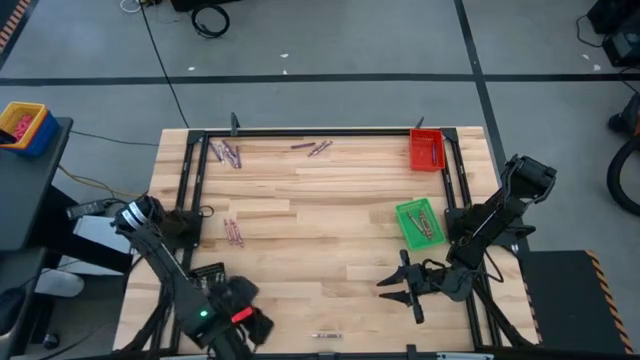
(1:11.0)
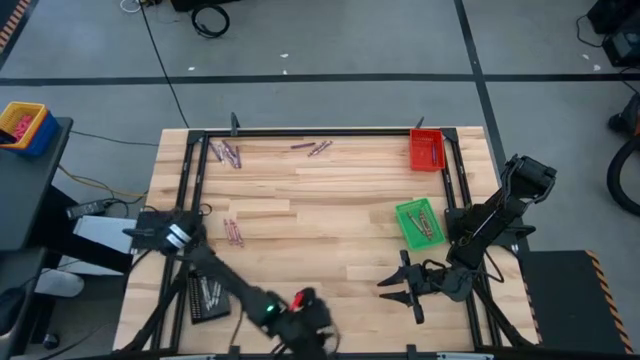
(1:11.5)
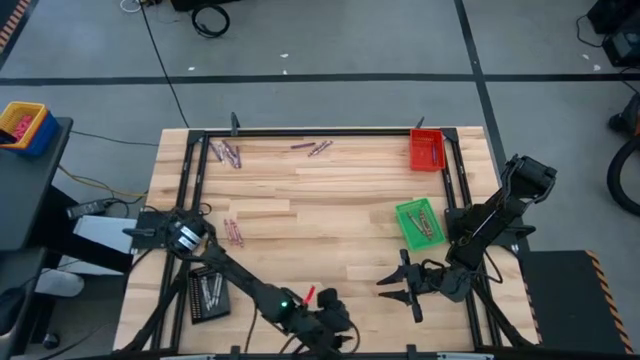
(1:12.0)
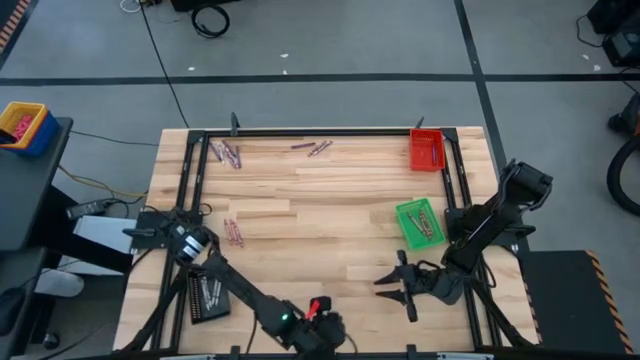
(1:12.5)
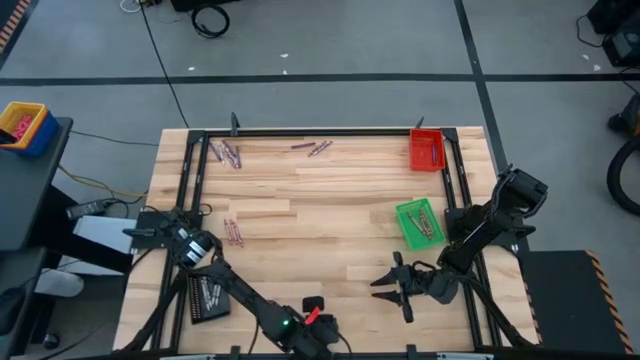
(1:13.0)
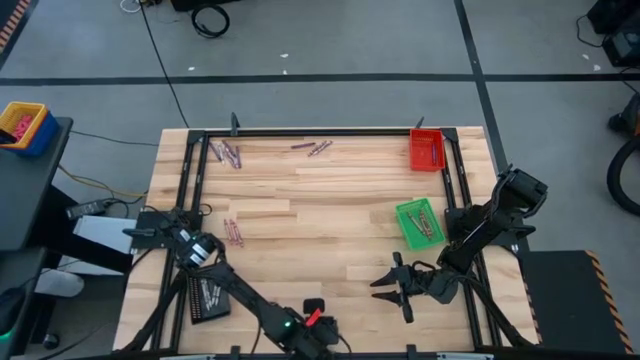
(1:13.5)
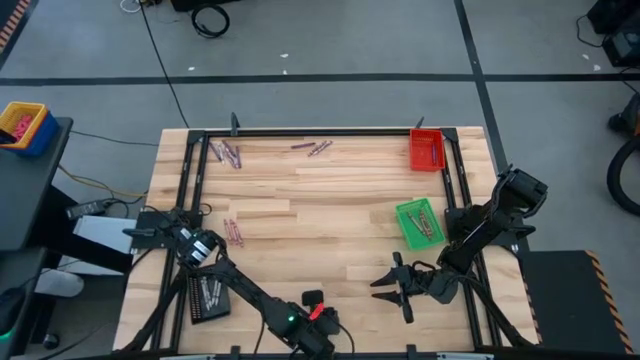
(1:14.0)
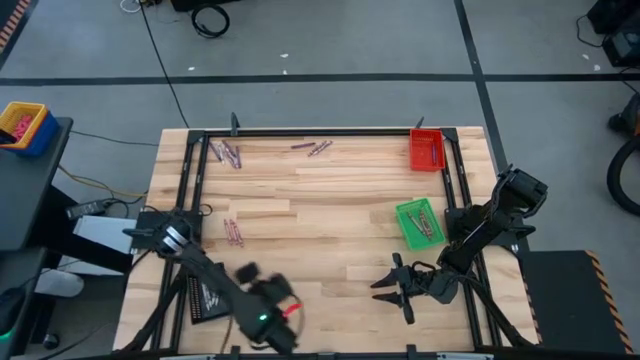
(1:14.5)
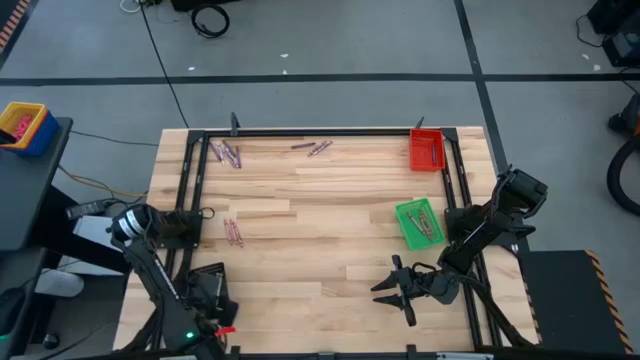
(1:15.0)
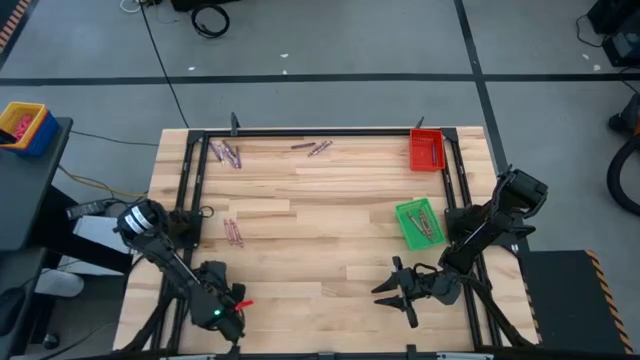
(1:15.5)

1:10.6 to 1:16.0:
Task: Sort crayons
Put the white crayon into the black bin

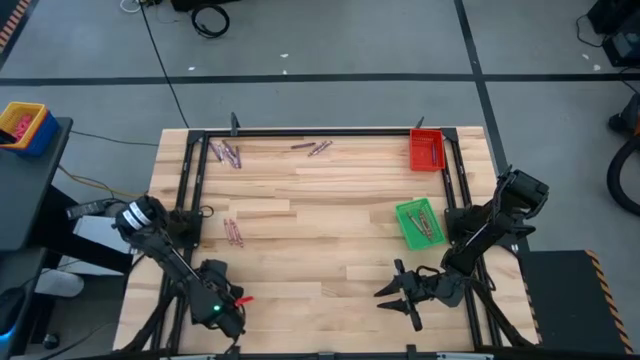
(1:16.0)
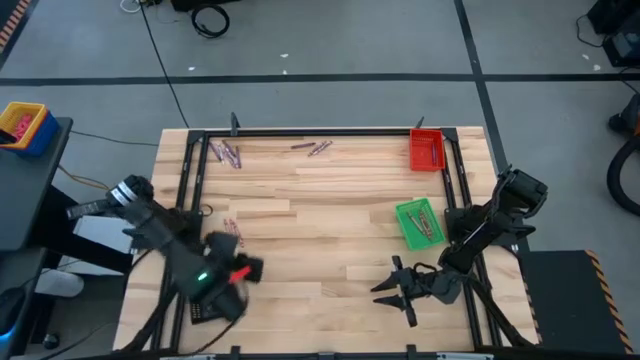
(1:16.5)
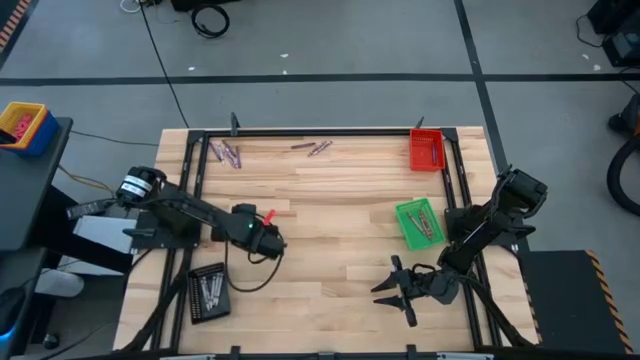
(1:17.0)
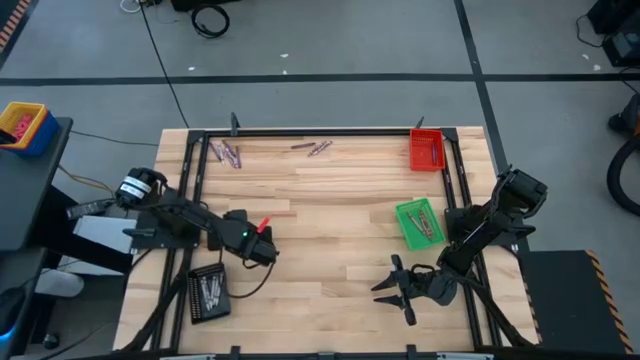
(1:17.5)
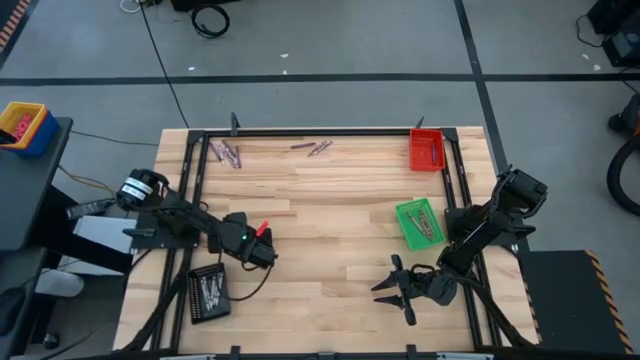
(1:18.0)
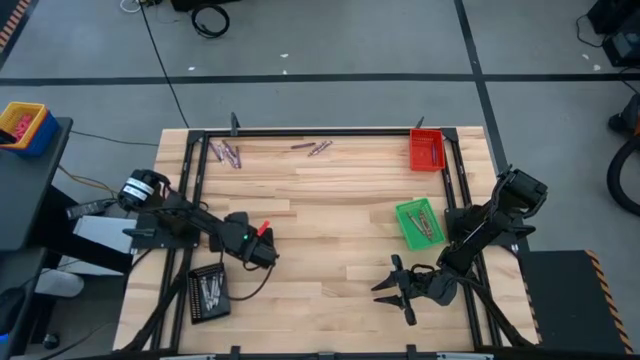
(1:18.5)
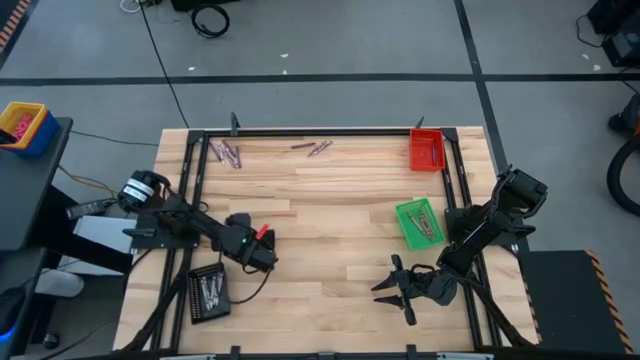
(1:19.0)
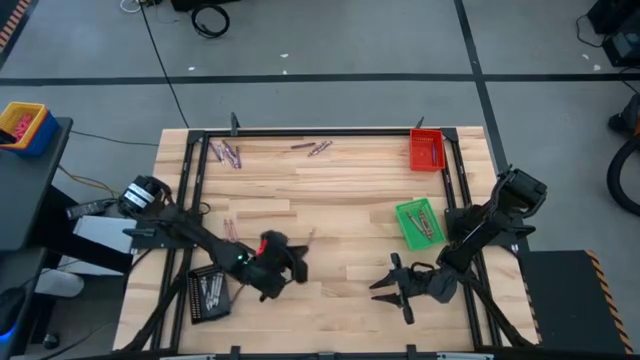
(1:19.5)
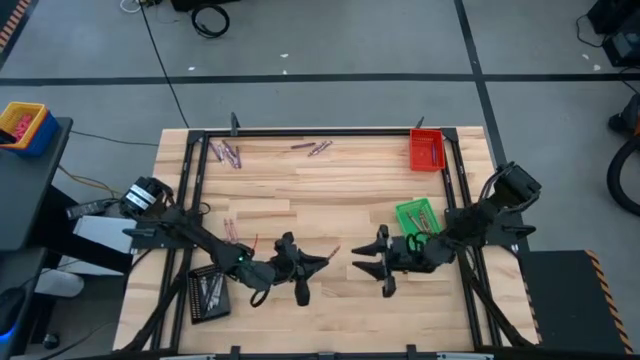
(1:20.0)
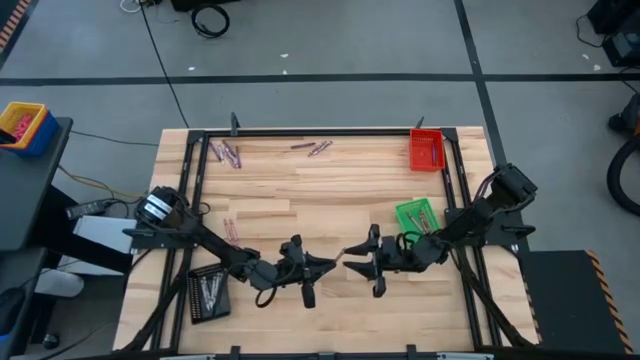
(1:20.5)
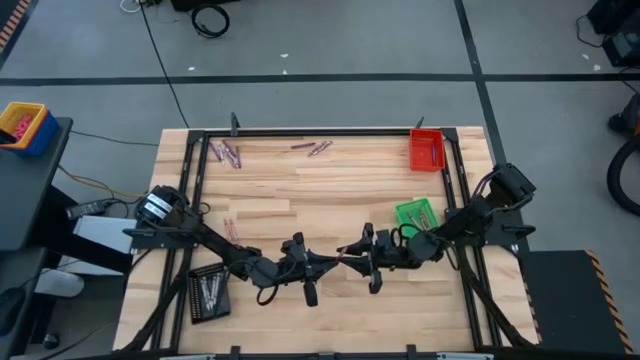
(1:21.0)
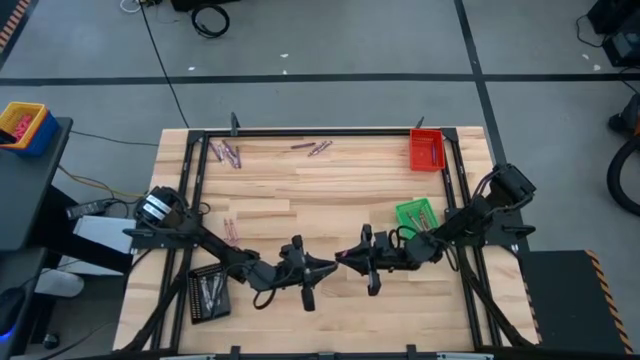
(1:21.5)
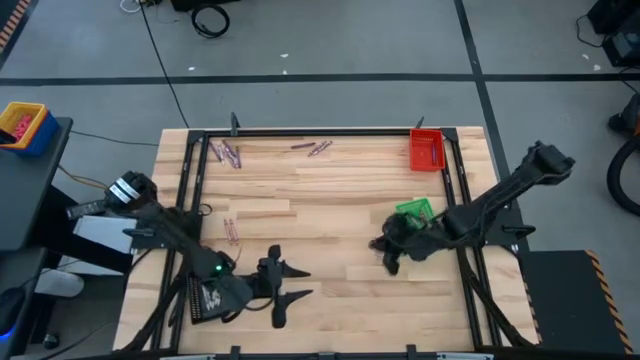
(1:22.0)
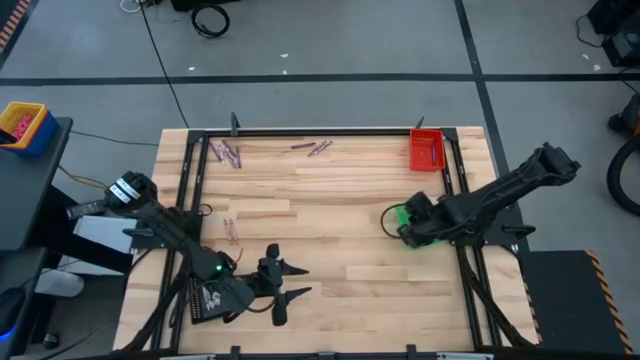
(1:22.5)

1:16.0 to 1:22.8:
Put the pink crayon into the green bin

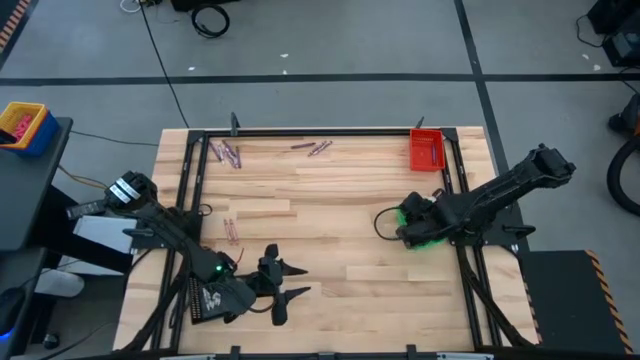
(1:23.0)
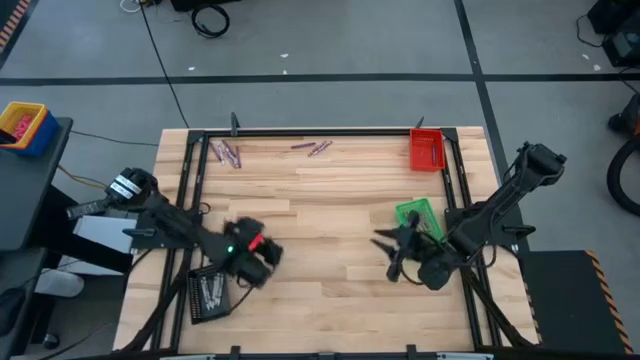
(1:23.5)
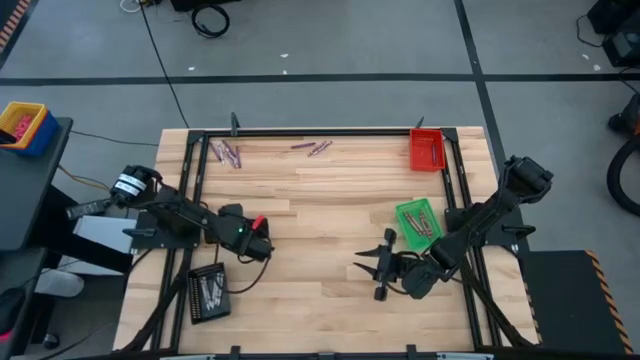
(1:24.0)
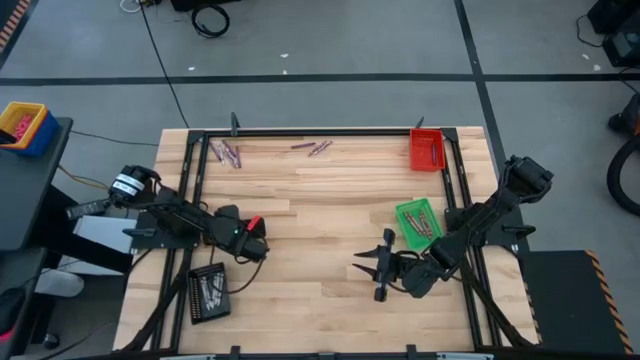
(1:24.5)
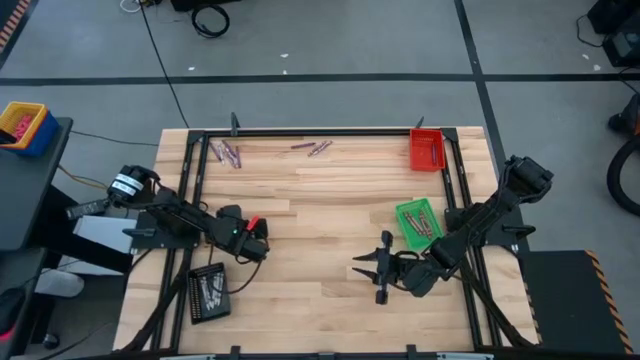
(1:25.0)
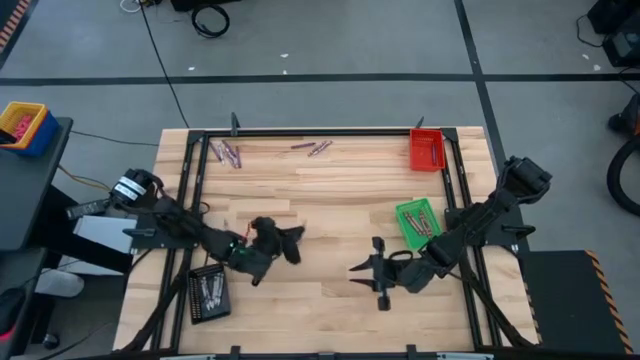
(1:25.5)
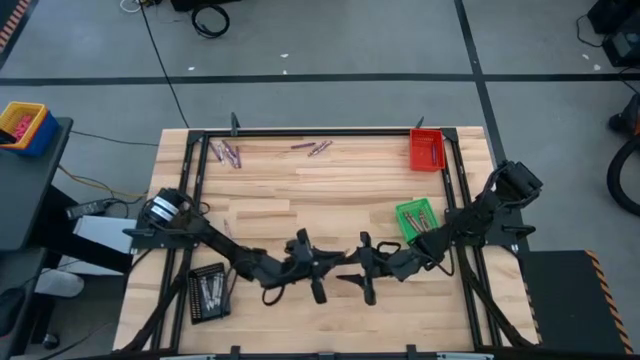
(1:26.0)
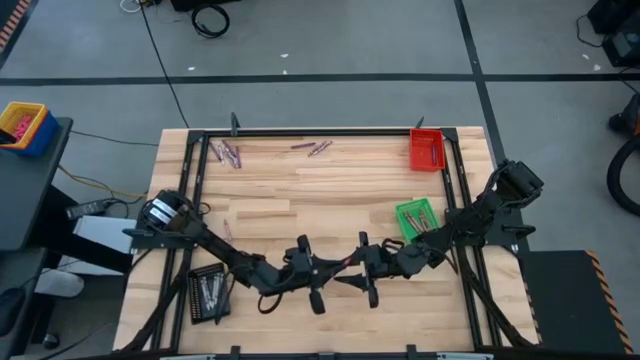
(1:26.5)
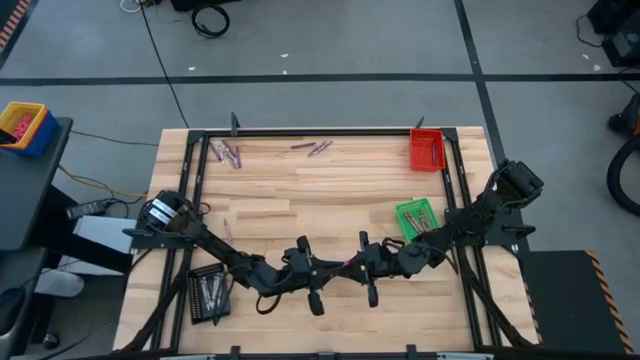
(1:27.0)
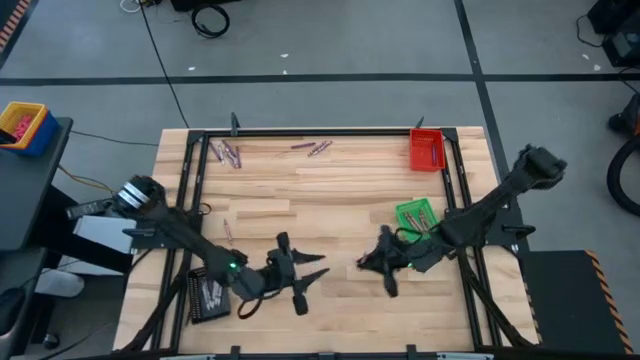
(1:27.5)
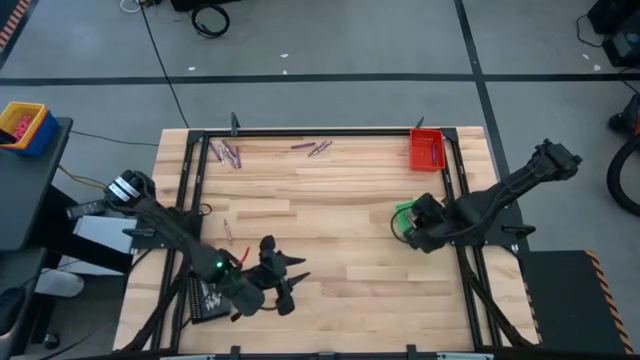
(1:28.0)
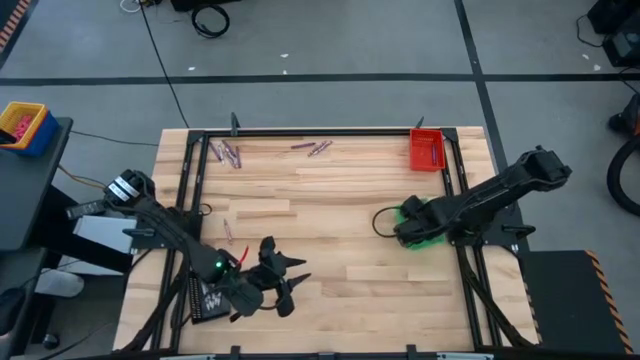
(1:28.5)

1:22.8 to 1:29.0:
Put the pink crayon into the green bin

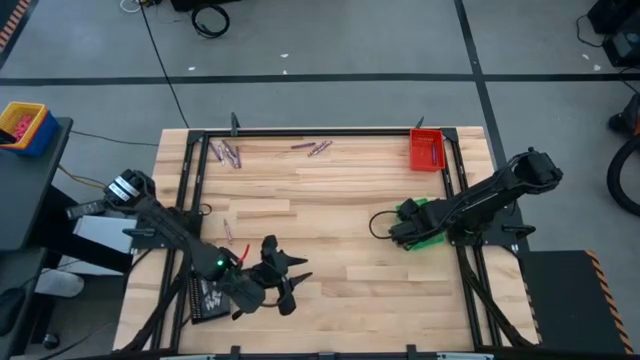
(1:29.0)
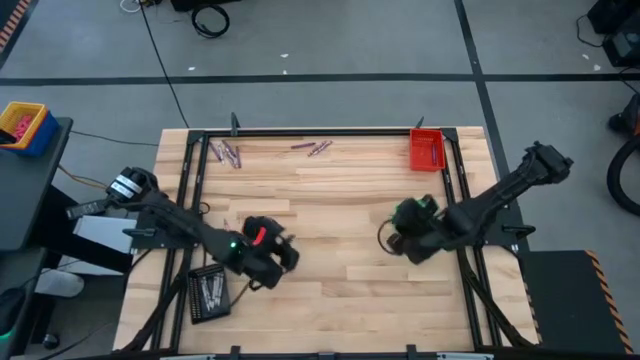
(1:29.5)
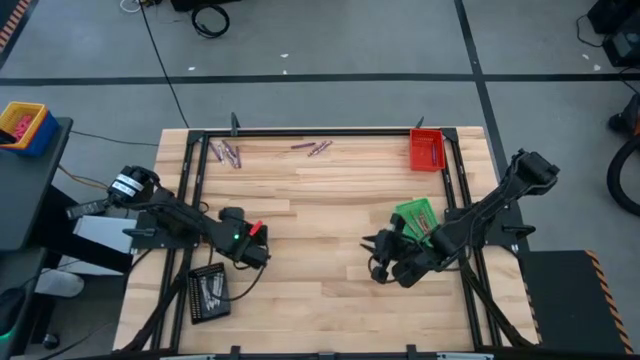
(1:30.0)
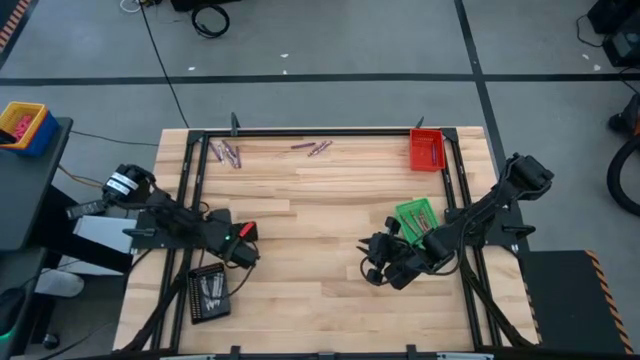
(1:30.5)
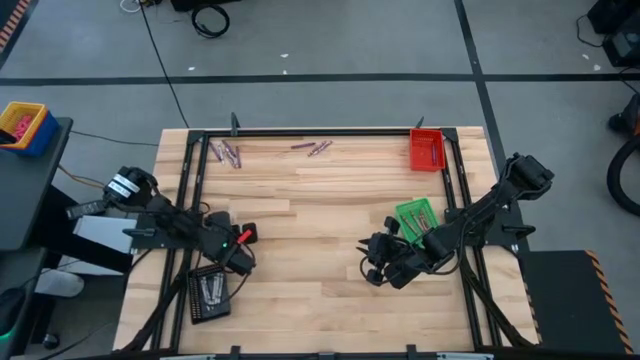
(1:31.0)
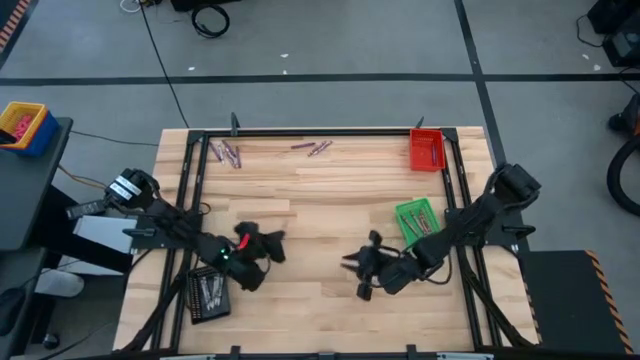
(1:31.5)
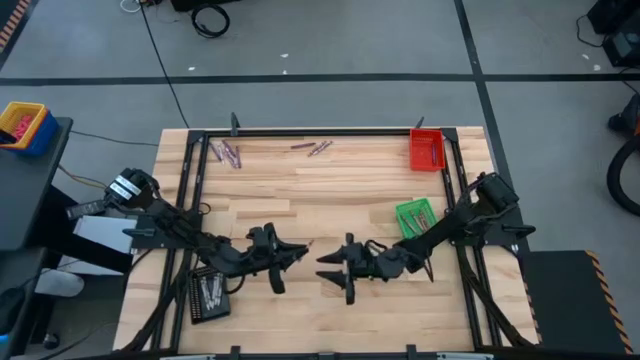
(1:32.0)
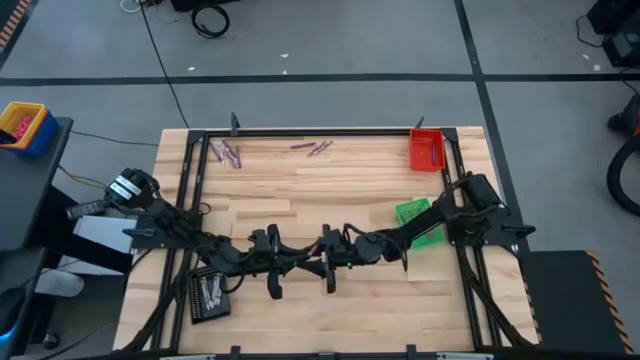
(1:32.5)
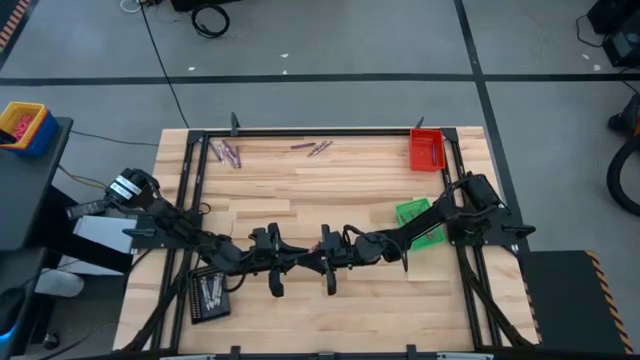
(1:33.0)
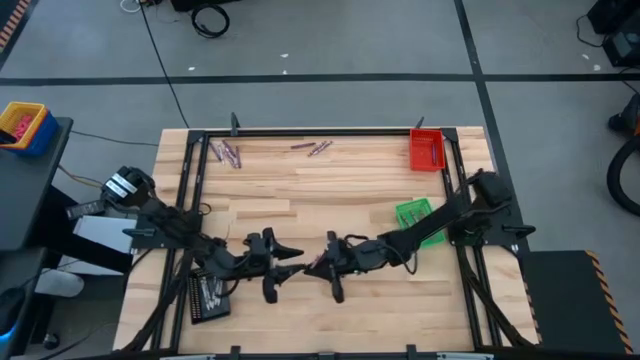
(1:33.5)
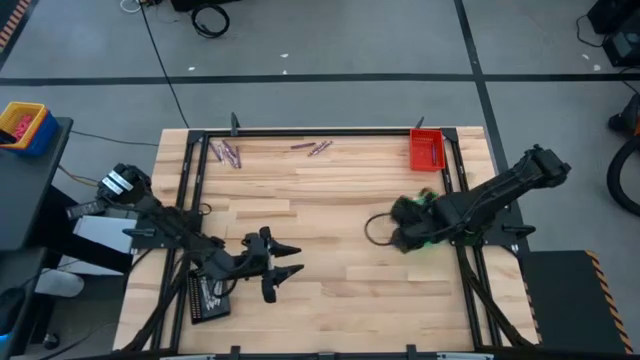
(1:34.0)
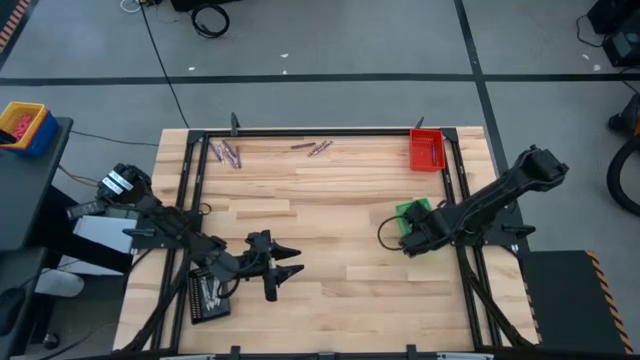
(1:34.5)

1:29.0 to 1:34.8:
Put the pink crayon into the green bin
